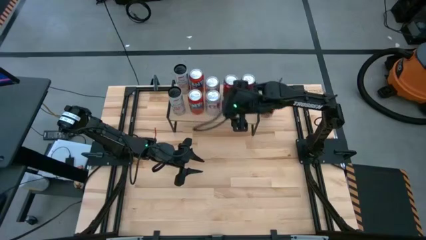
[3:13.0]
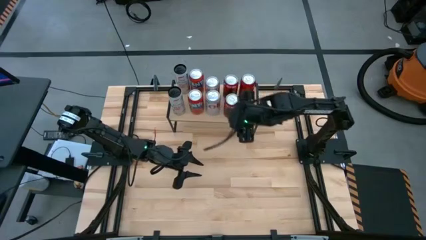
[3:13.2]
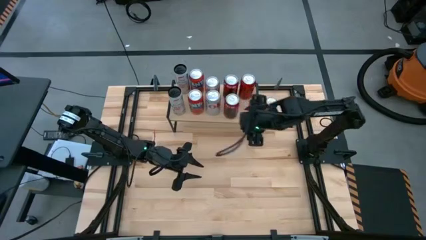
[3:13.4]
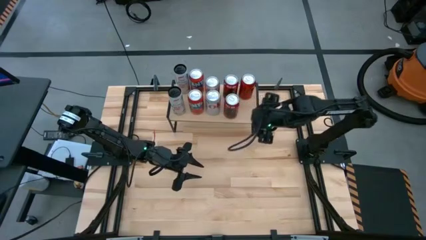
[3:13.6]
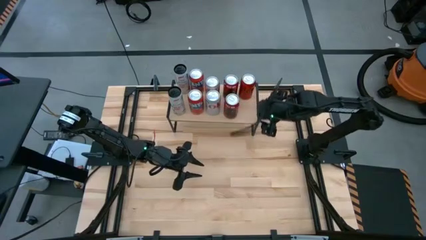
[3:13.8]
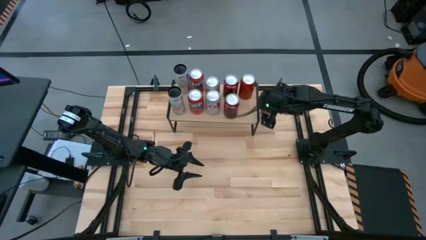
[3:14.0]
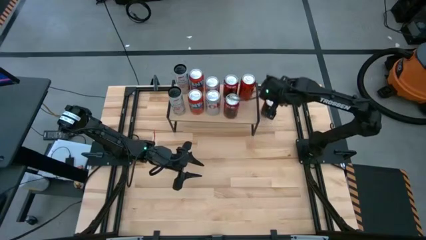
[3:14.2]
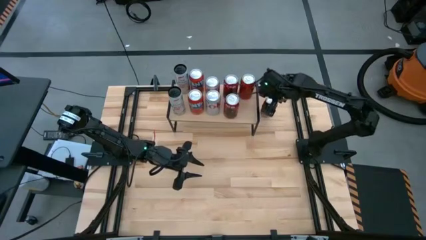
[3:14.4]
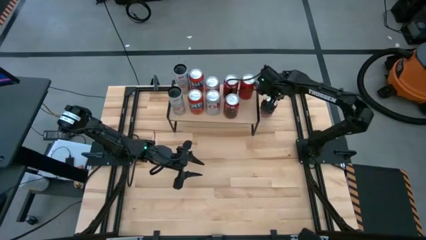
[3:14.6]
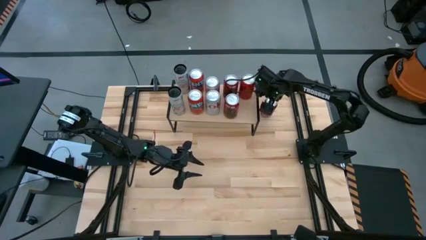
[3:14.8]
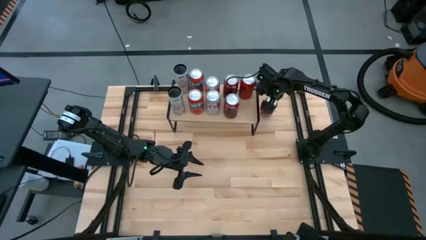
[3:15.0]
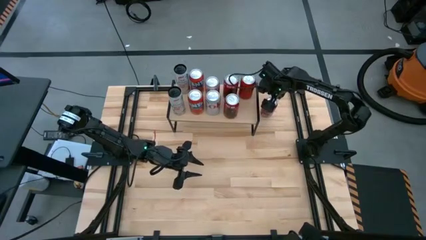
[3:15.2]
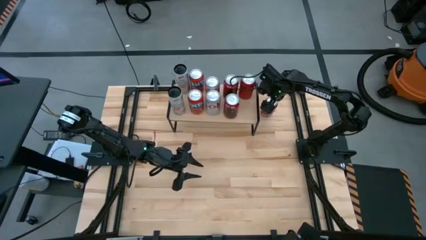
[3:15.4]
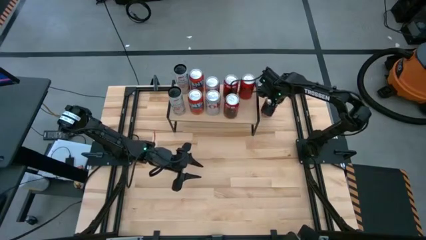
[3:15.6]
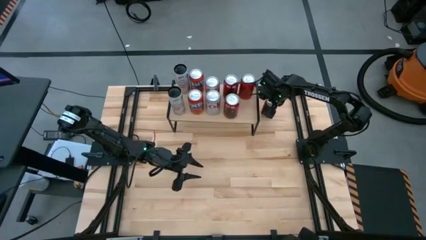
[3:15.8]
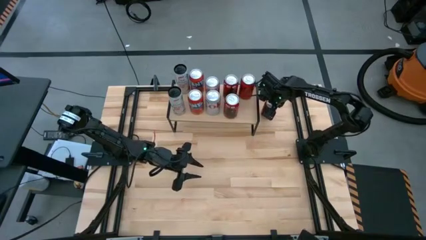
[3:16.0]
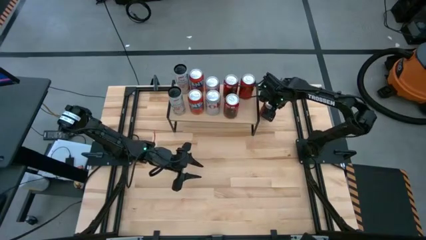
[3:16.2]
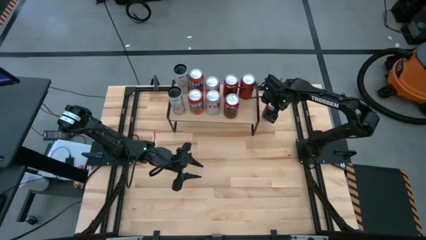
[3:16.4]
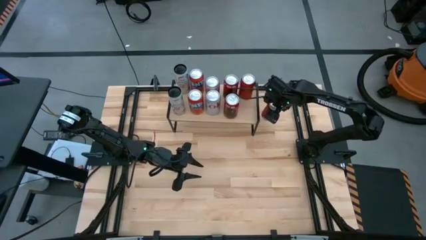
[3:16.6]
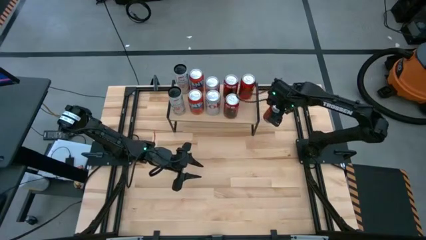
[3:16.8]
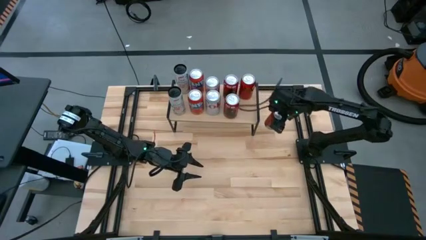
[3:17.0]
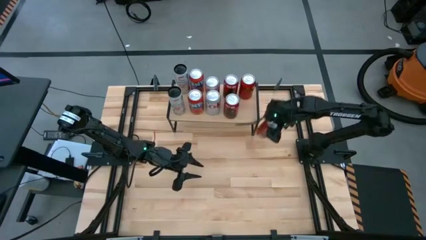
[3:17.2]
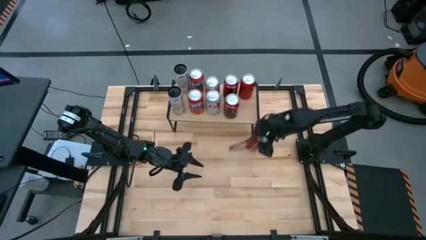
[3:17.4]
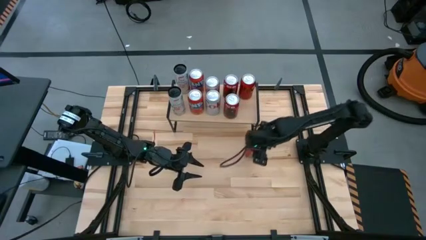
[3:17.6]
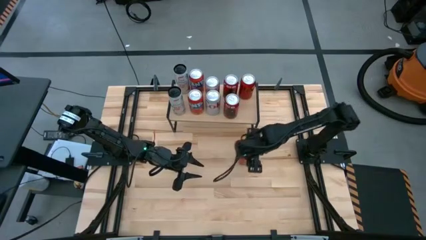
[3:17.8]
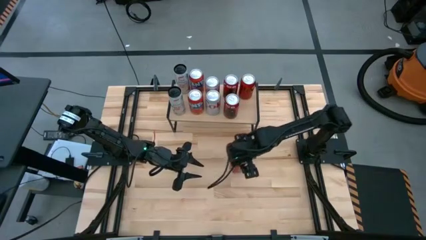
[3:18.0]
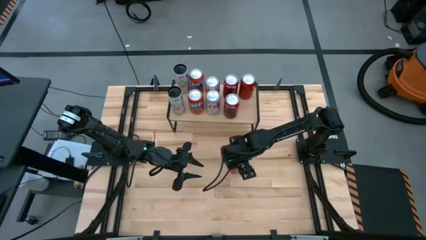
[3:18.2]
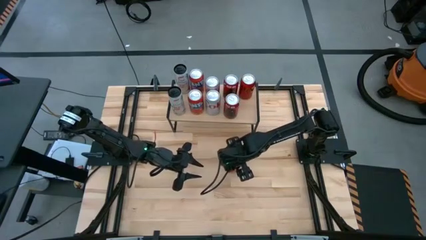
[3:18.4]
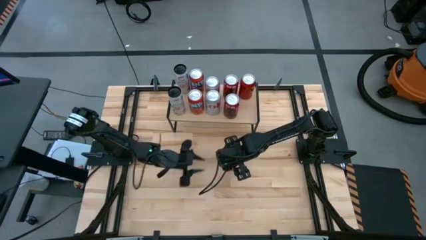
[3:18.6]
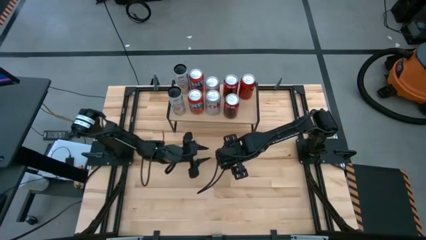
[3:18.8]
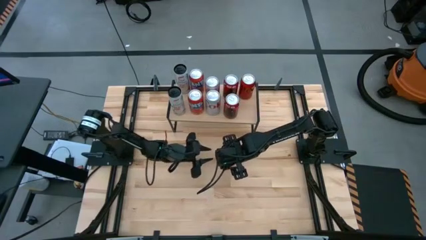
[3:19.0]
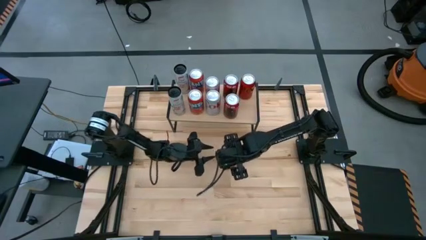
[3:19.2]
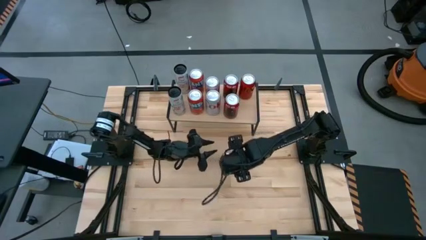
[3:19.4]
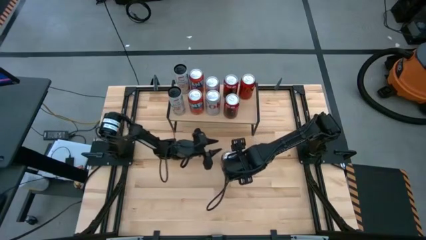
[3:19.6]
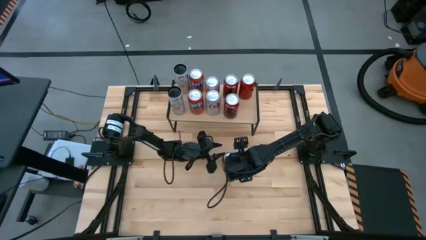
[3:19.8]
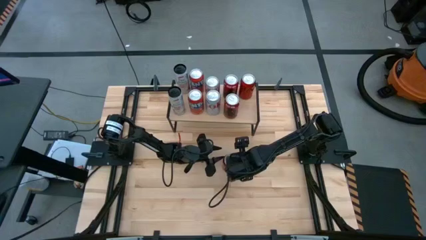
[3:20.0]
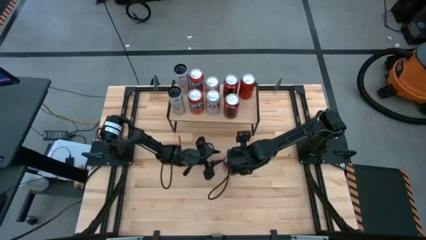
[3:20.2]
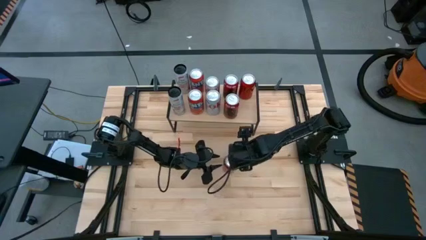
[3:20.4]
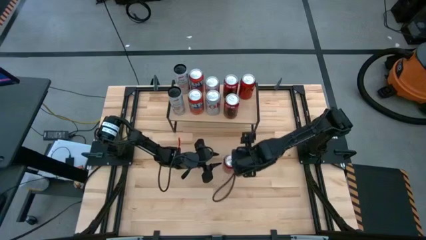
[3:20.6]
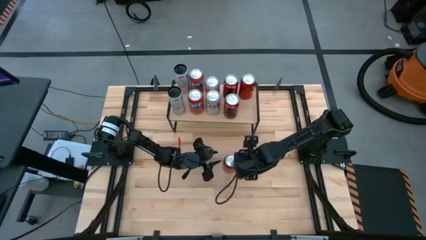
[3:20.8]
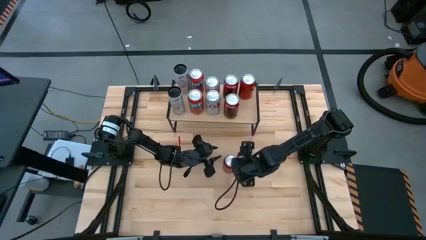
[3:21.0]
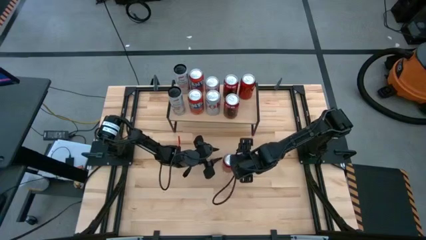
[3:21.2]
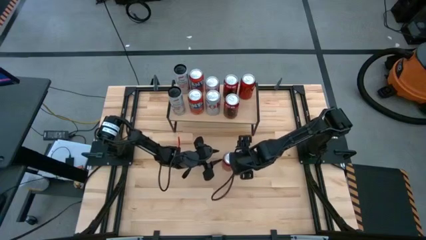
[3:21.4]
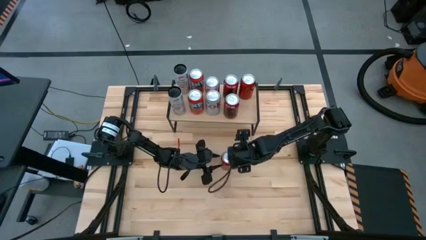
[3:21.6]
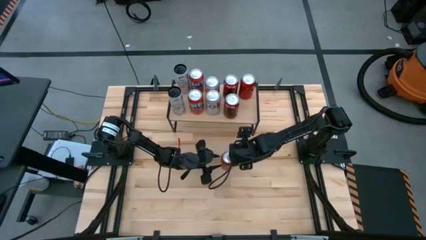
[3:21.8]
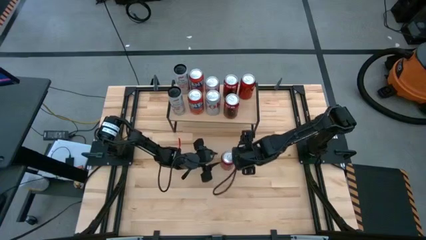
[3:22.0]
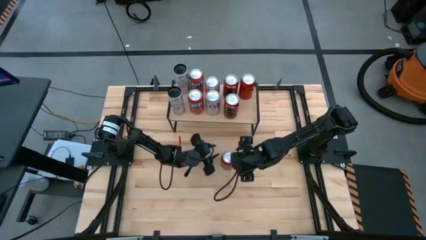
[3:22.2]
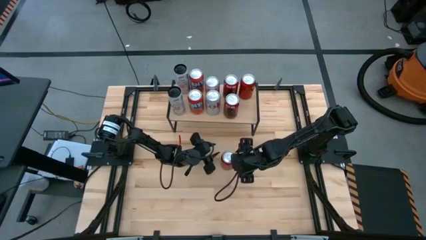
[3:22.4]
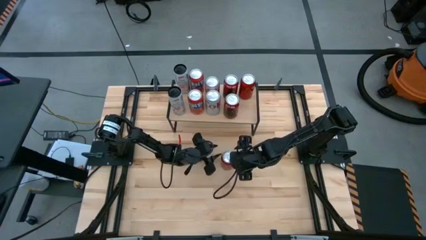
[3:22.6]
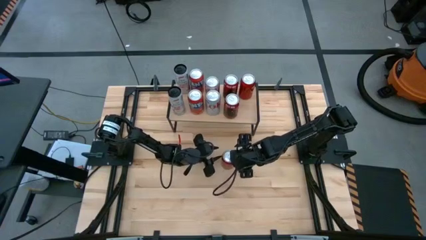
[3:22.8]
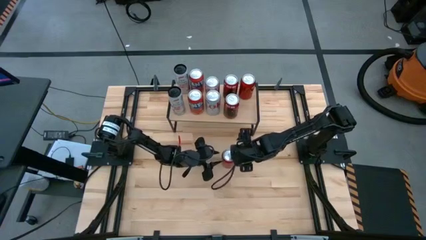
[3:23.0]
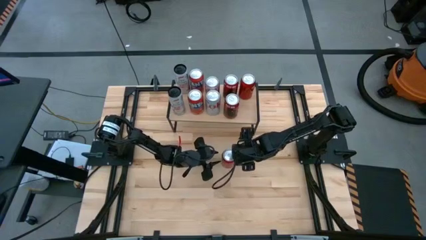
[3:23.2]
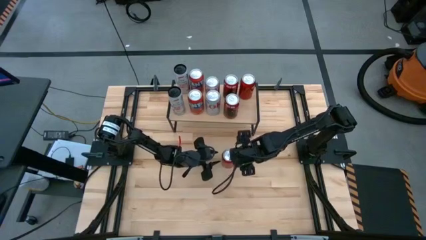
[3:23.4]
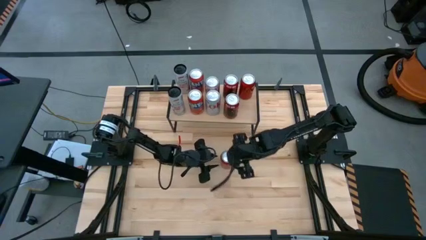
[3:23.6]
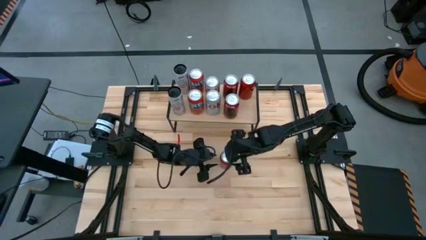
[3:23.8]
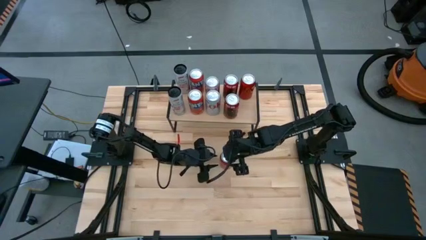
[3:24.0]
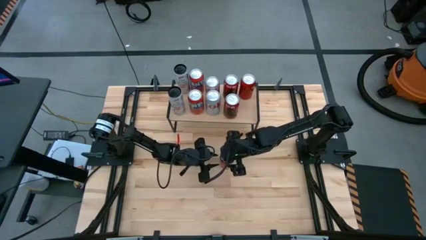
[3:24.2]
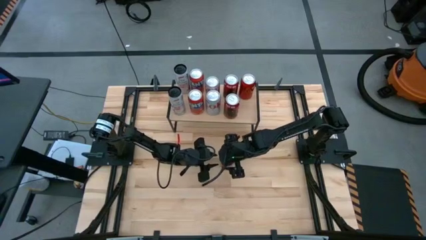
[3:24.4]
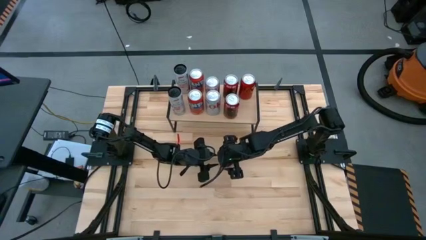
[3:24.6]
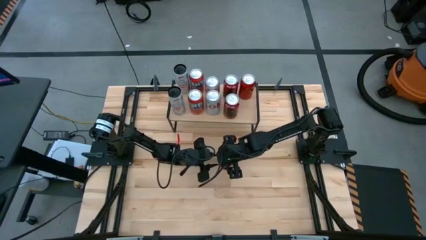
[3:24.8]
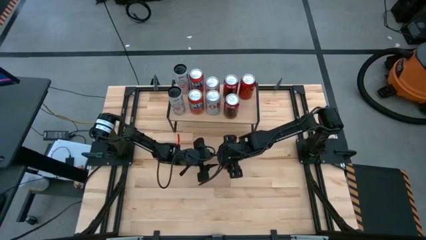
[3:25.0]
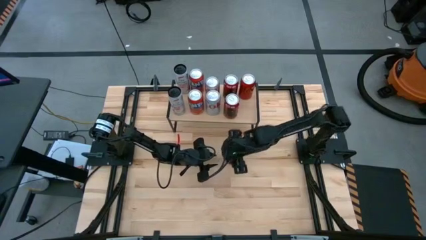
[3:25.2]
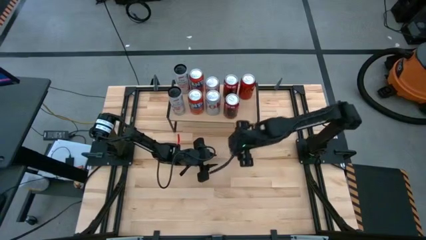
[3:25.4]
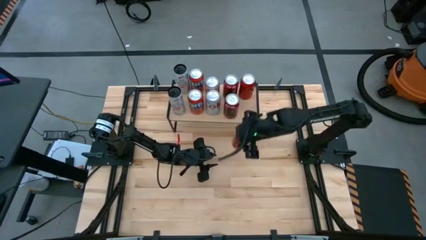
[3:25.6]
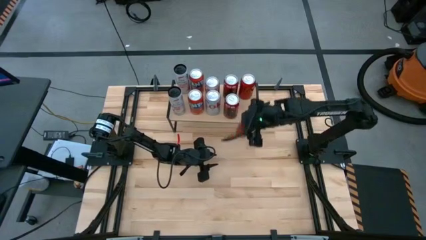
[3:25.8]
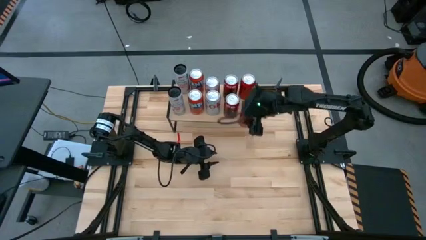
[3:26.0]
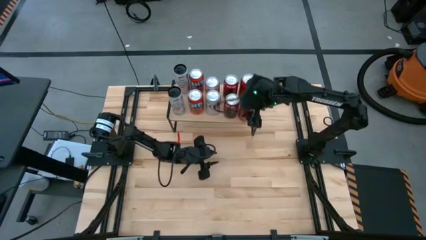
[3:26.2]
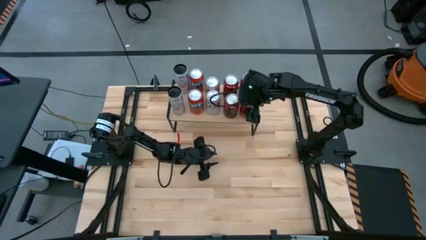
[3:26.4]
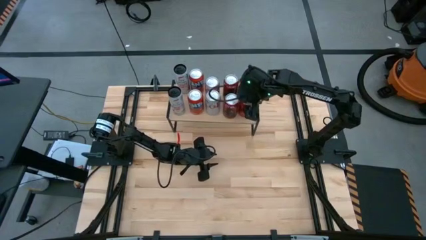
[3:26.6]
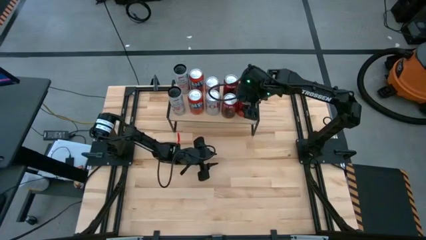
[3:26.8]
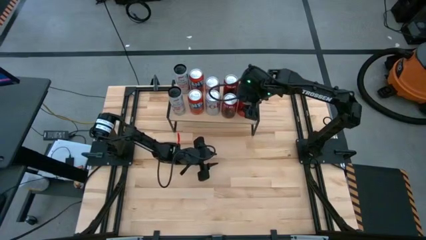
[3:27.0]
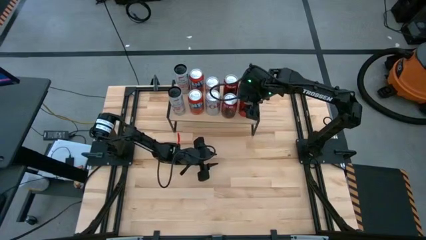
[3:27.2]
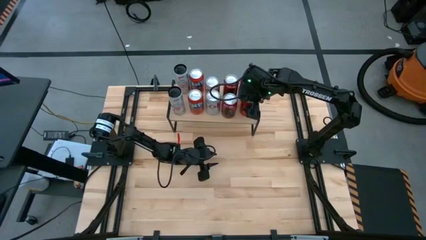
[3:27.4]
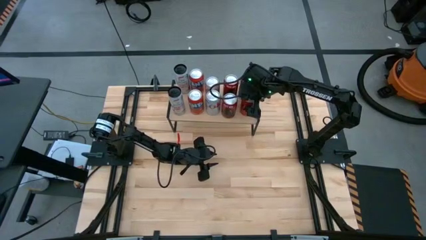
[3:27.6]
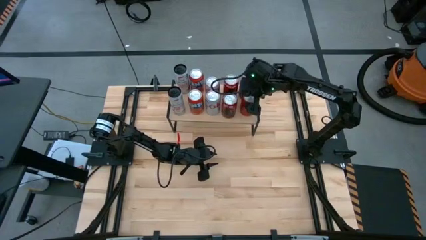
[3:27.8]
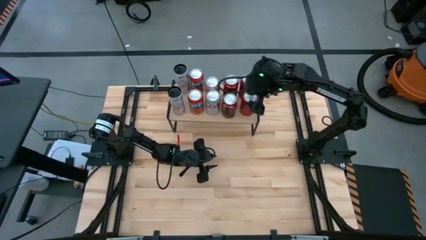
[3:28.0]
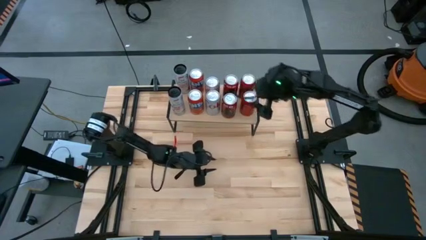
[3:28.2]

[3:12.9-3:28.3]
Task: Place canned beverage on shelf
Put the red and black soda can on the shelf aligned with the other red and black soda can
